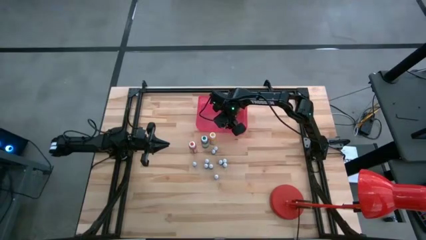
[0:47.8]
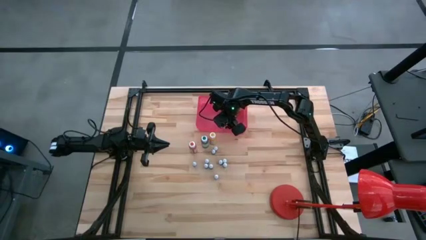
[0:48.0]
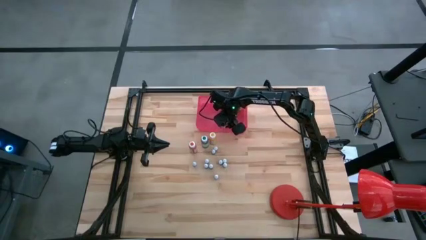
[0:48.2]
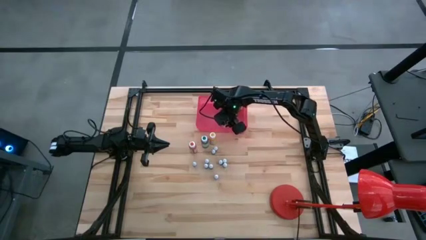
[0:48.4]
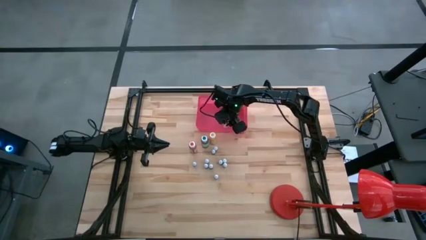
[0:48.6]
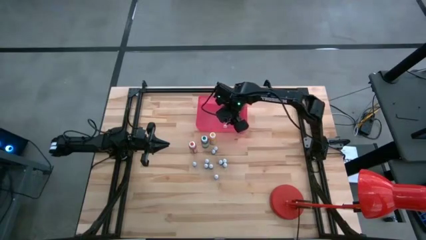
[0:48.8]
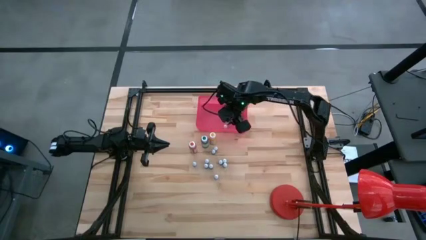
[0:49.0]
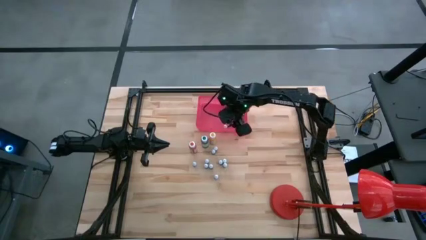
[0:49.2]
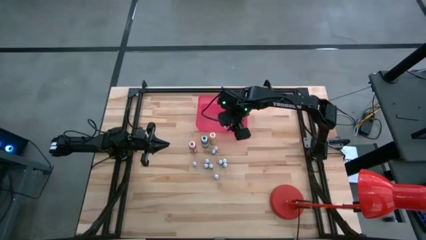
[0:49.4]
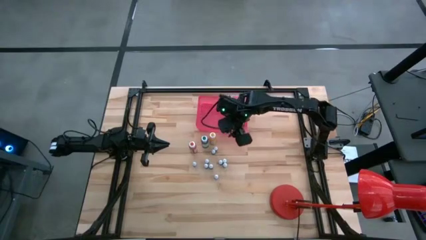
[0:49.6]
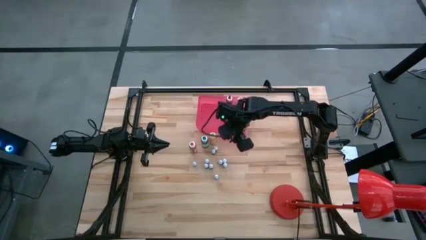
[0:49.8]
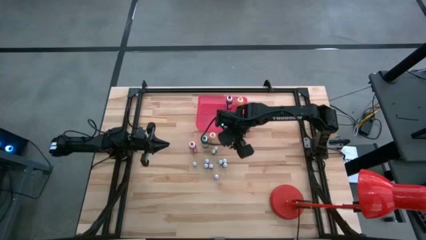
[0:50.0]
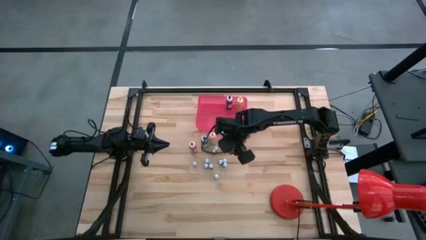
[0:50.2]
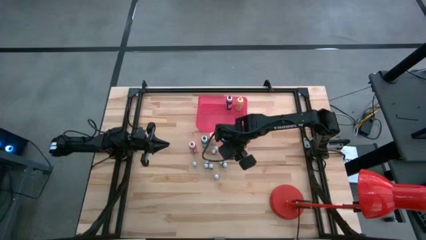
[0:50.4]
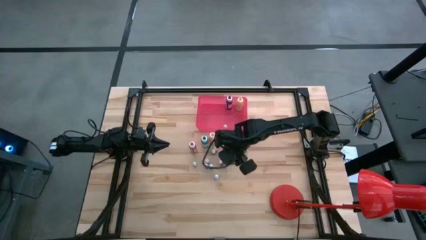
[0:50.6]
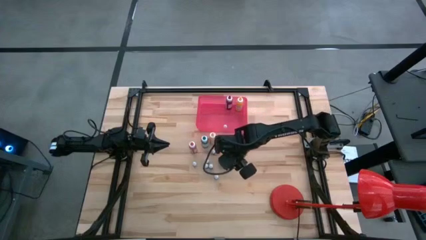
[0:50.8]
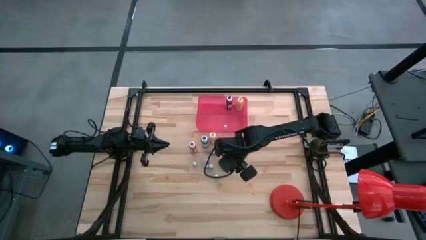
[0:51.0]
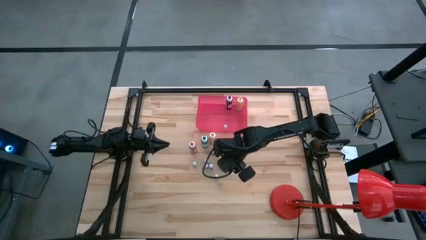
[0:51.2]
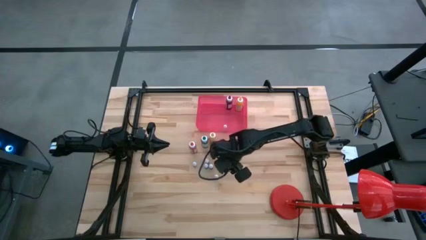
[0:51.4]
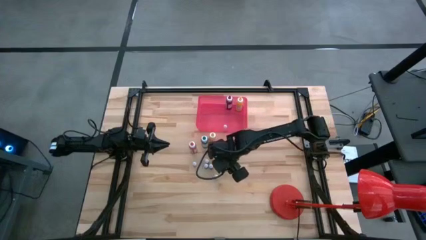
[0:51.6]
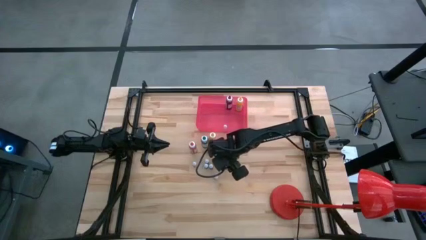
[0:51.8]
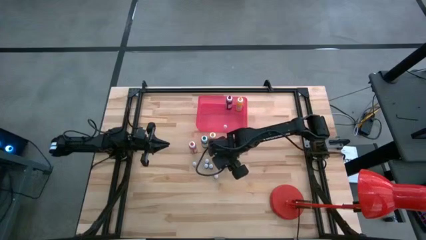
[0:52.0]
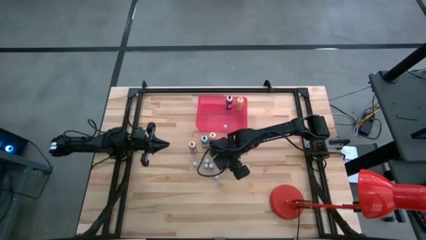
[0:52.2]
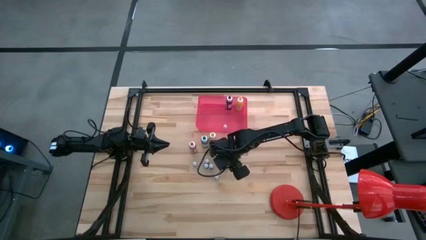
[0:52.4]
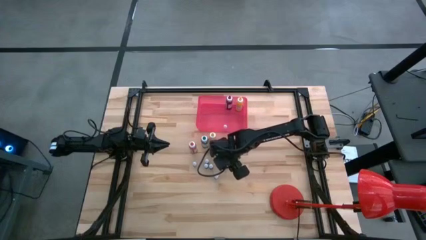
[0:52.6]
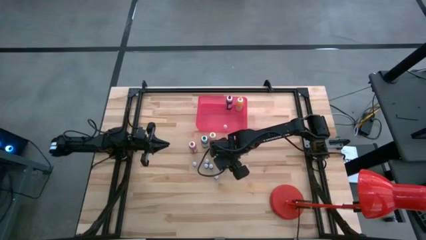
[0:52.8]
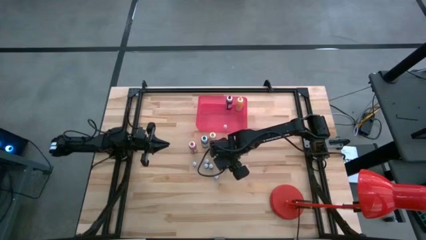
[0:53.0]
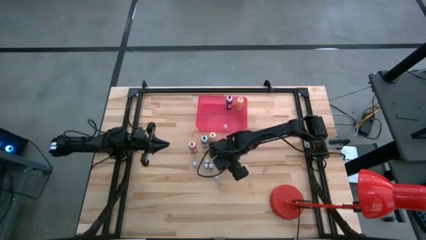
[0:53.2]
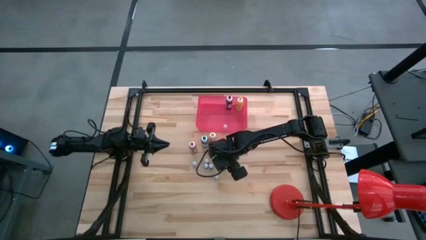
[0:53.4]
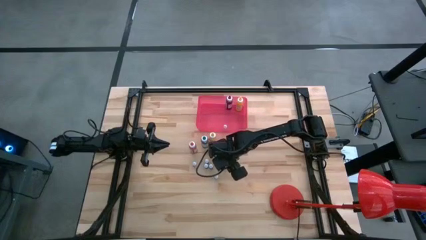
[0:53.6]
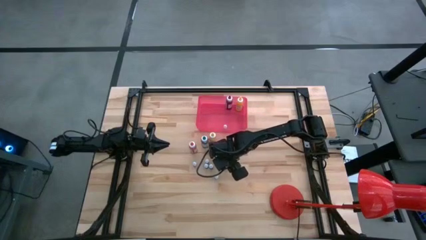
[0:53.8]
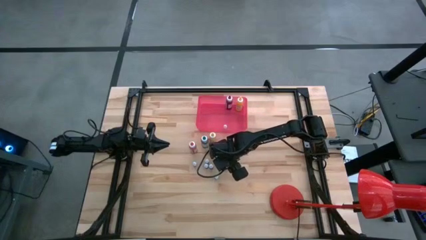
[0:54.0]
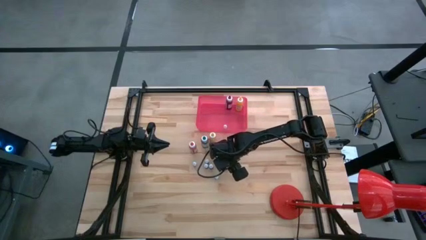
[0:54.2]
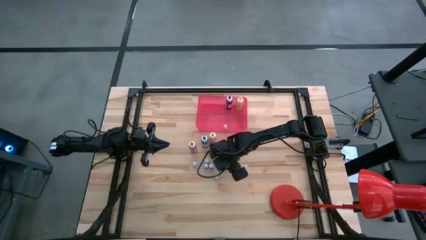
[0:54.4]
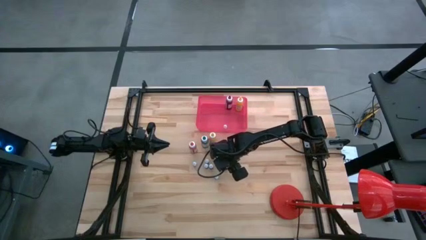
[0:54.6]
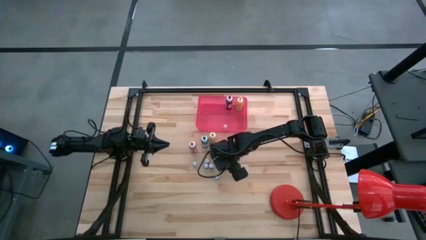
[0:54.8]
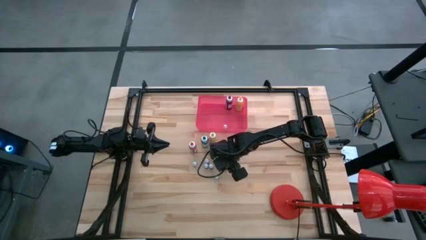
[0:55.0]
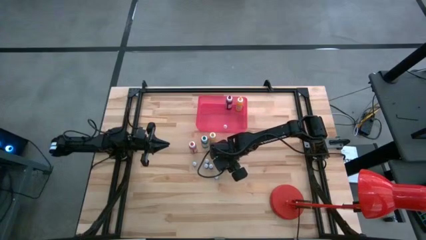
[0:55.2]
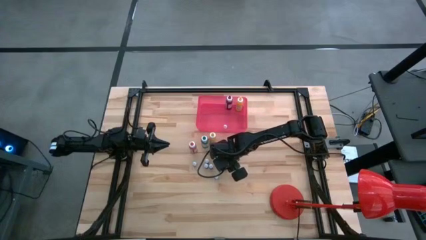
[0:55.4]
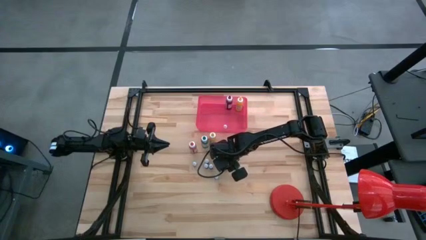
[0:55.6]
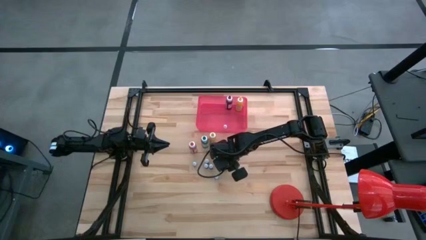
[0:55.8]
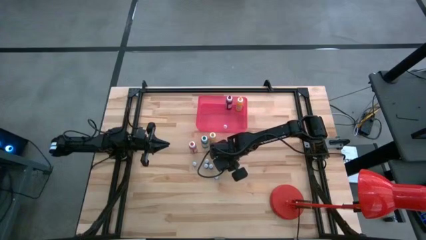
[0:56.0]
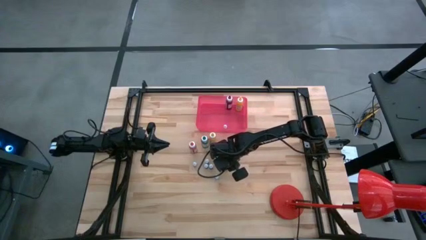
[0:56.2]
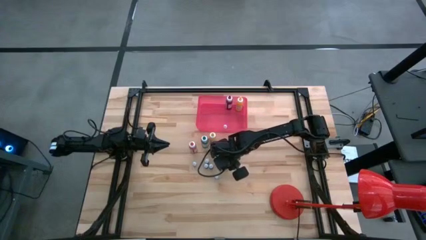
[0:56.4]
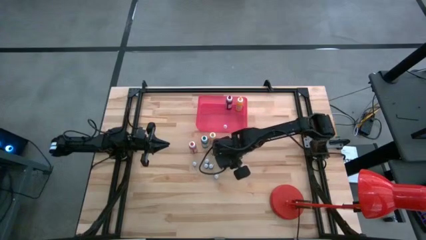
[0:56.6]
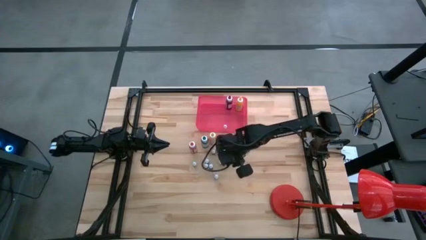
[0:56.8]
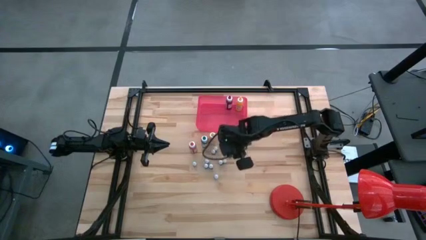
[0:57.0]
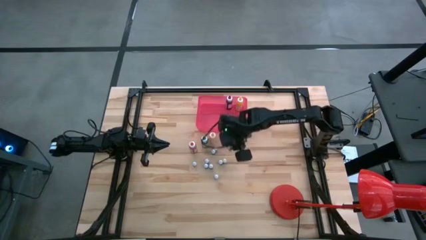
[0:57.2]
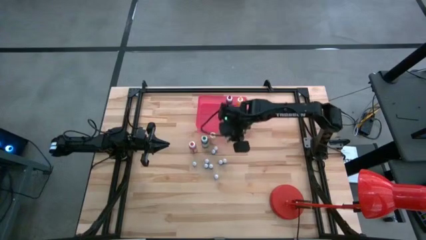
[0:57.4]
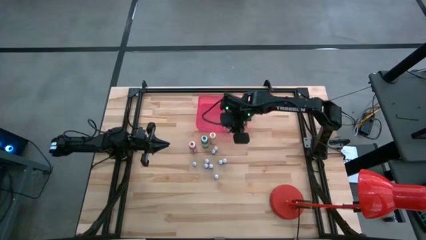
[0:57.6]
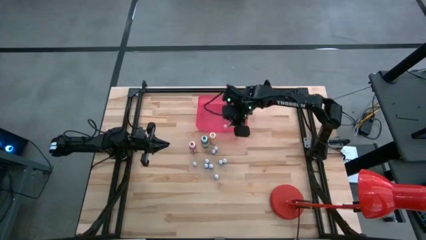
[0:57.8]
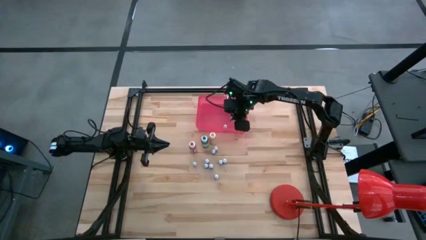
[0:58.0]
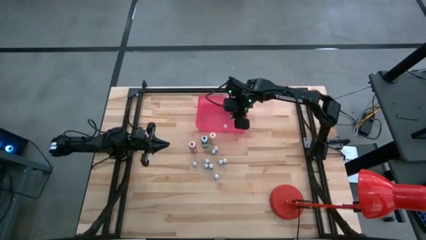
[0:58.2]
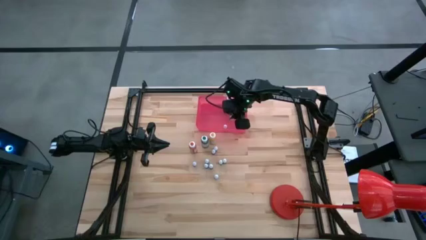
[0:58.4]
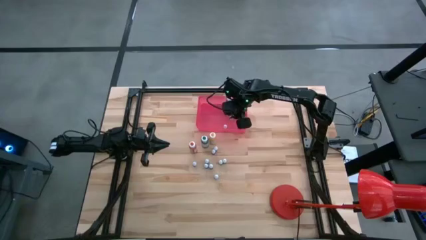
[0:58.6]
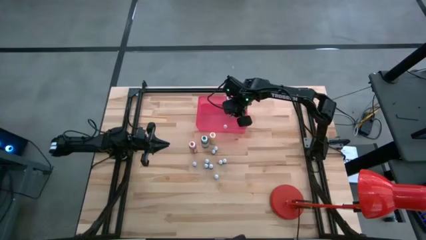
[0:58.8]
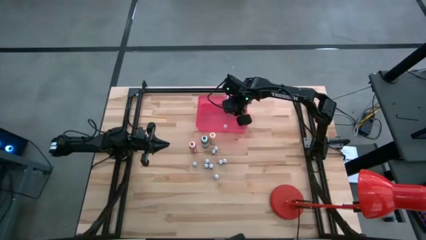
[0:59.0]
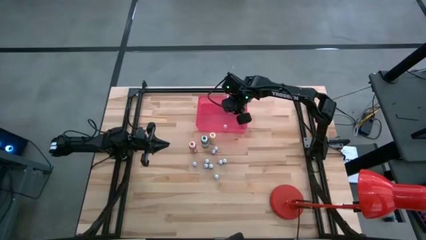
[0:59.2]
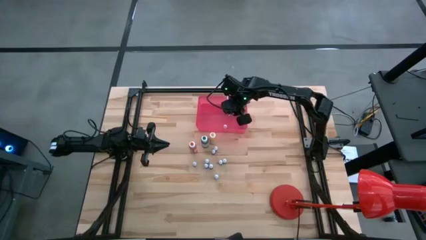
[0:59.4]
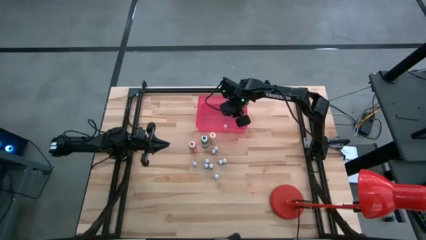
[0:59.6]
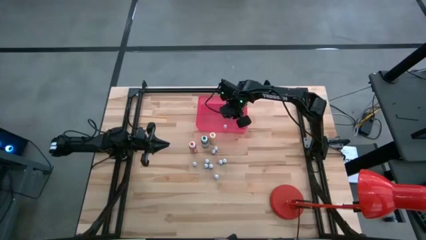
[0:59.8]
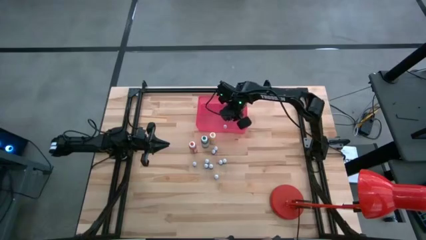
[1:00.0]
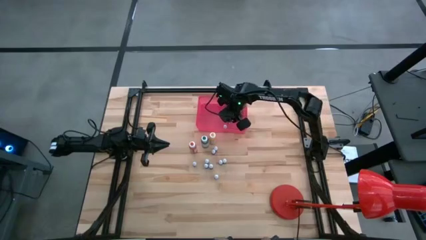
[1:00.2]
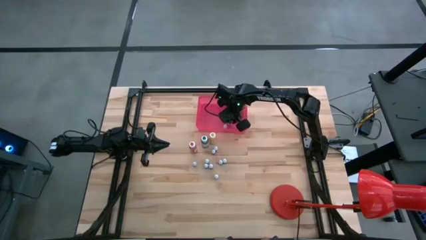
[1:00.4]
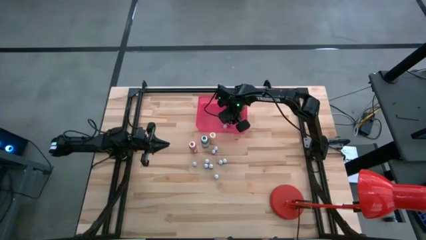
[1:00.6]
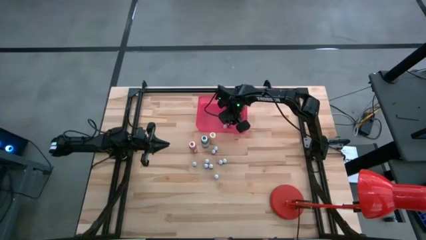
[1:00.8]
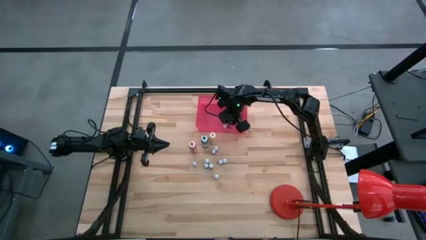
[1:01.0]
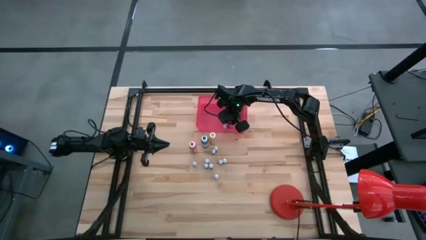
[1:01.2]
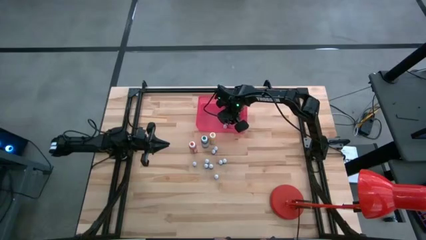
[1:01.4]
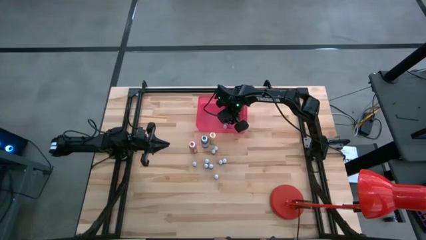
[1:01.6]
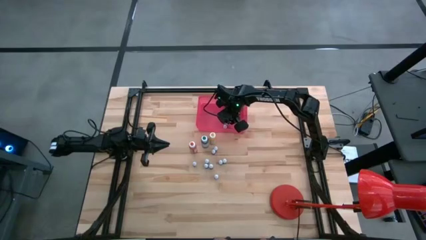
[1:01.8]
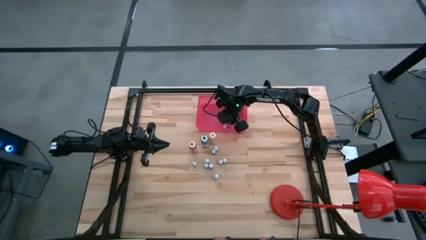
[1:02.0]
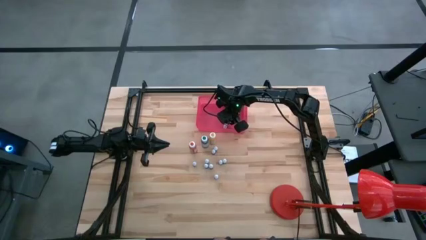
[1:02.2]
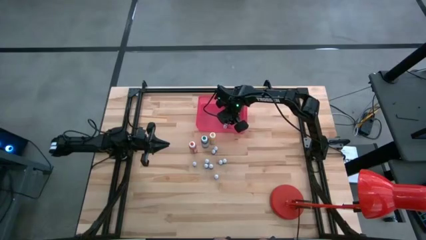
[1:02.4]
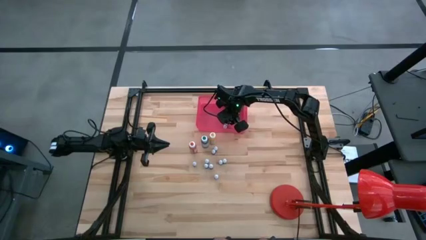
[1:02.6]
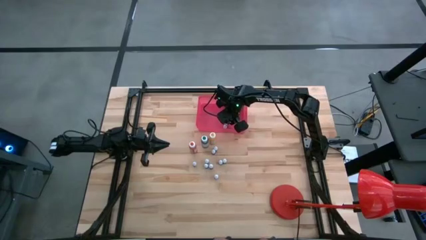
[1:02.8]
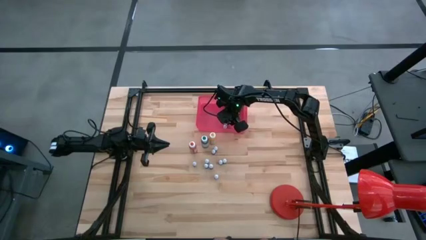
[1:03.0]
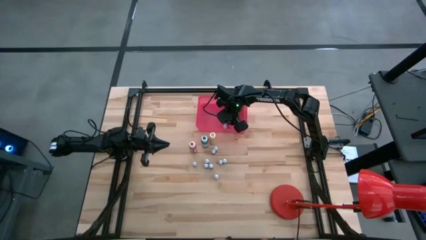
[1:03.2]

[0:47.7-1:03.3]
Task: Pick & Place food coloring
Put the small green food coloring bottle into the pink bin
